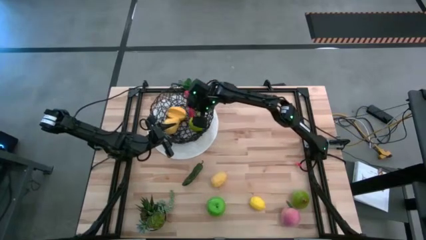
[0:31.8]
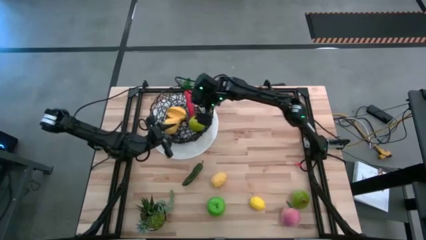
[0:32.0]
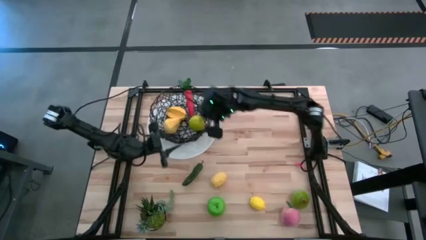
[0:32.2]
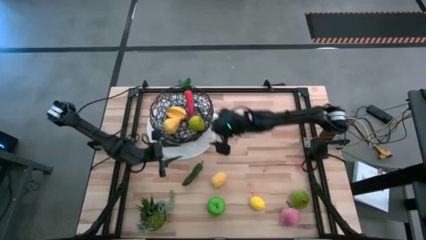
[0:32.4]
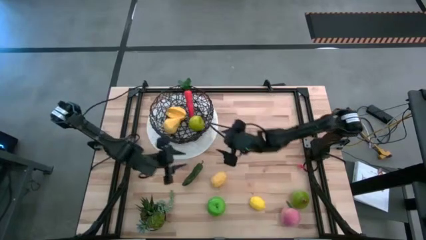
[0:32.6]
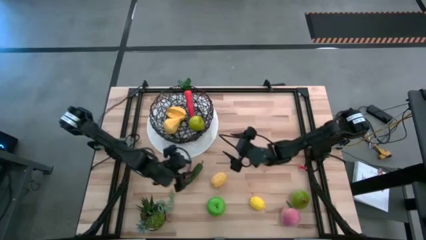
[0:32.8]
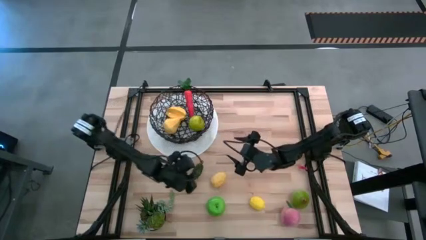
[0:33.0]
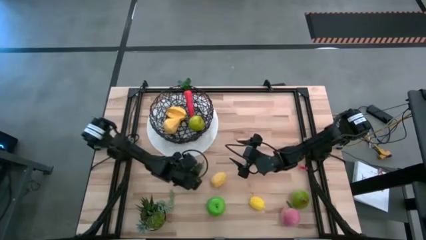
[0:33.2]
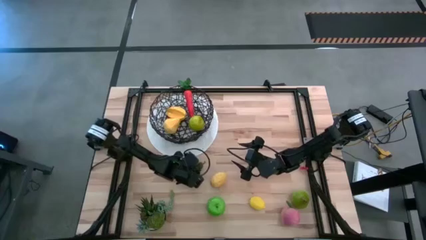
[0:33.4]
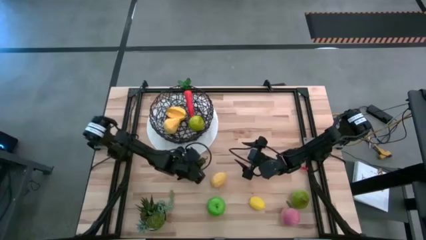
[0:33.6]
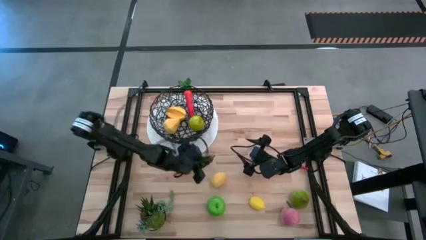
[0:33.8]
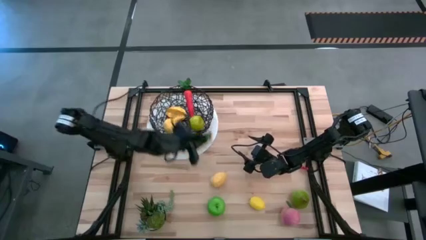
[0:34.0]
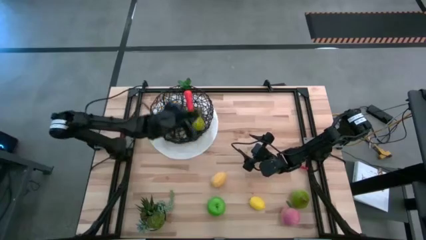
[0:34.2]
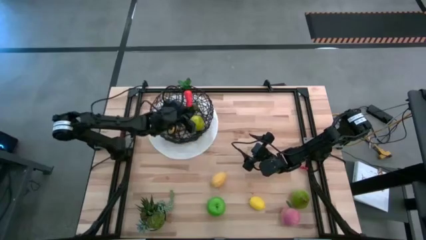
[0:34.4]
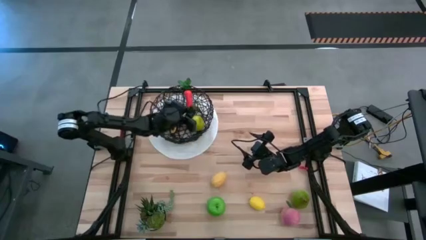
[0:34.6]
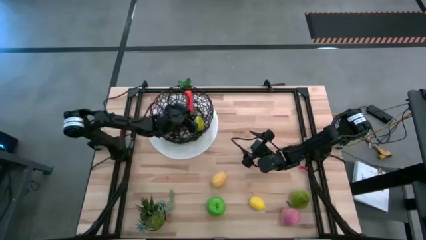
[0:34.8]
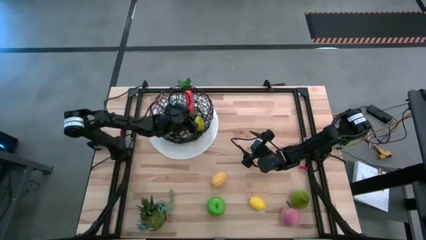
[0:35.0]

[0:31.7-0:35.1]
Task: Build produce basket
Put the green chili pepper into the wire basket

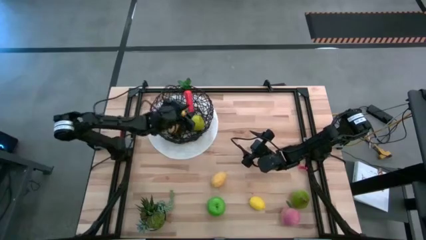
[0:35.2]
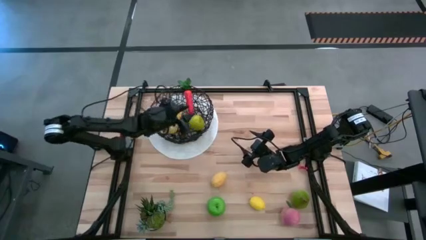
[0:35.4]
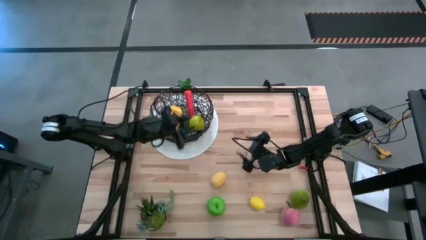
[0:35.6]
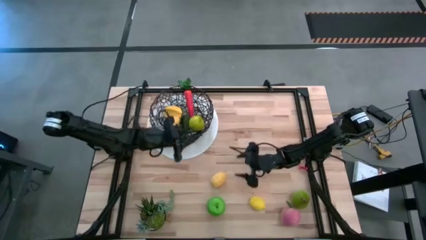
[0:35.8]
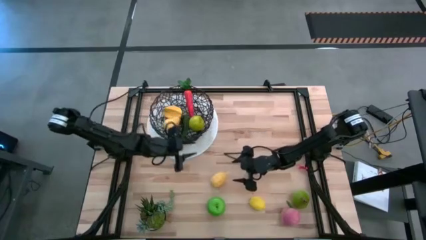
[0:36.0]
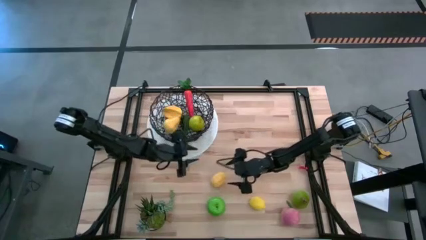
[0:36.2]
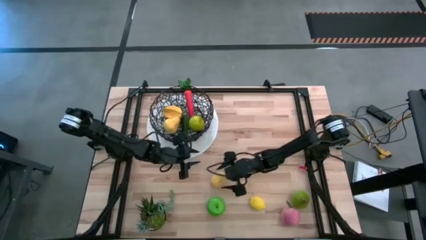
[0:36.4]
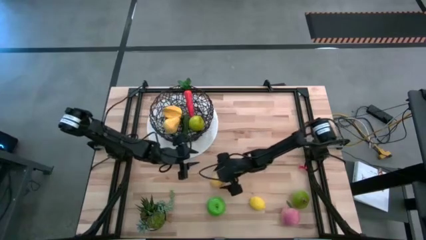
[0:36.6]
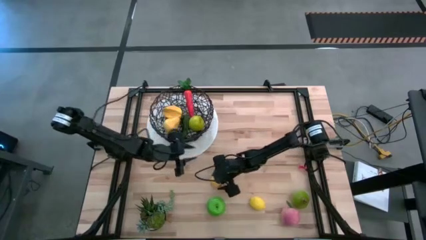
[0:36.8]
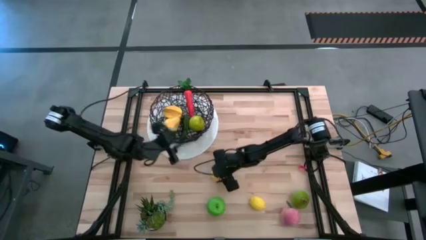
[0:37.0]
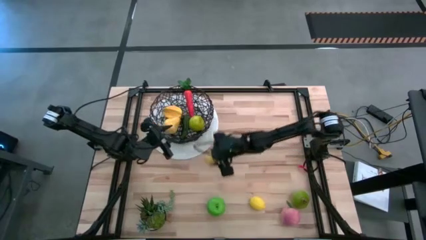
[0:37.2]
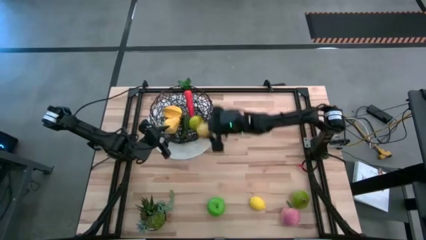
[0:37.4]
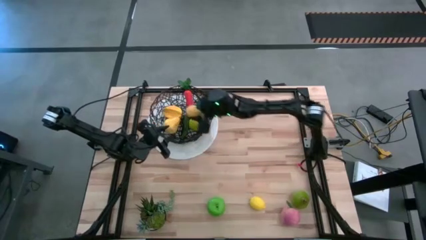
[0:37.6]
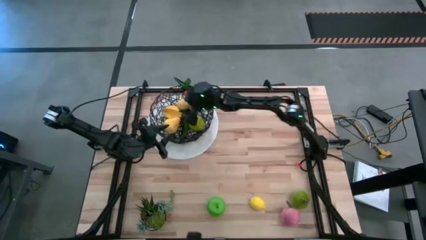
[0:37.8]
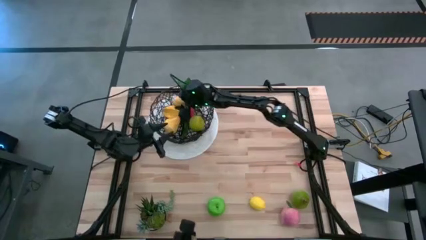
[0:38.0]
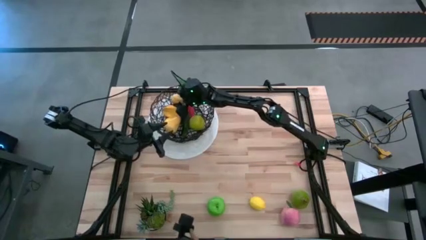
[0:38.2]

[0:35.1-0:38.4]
Put the potato into the wire basket

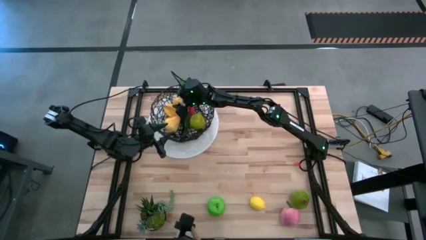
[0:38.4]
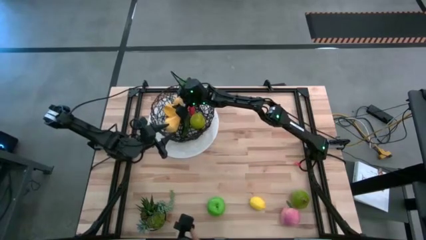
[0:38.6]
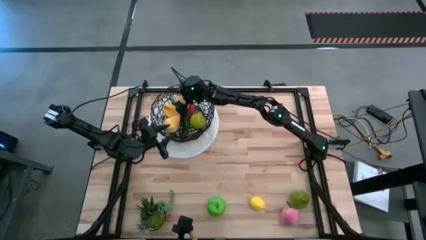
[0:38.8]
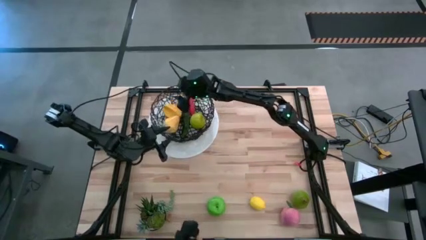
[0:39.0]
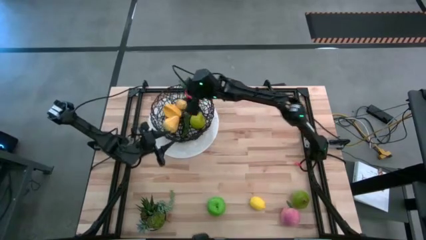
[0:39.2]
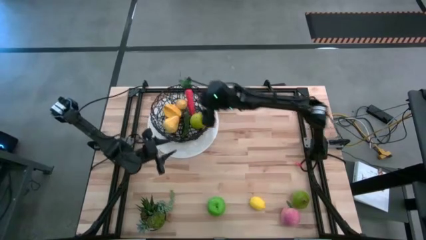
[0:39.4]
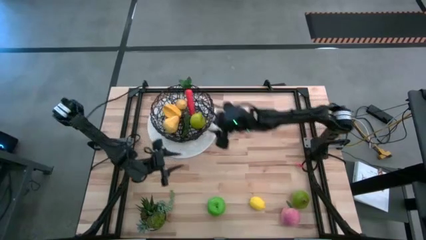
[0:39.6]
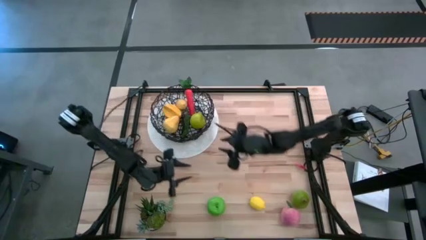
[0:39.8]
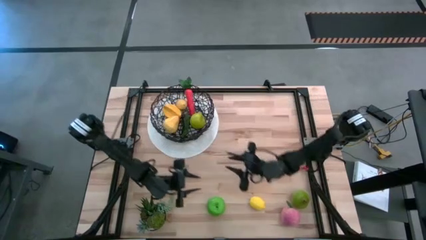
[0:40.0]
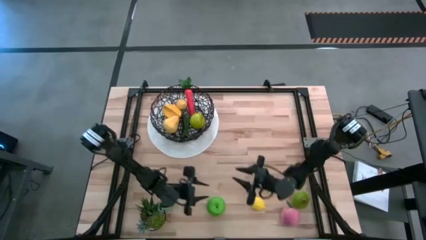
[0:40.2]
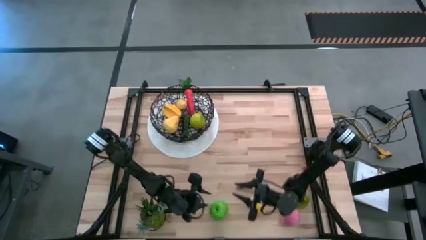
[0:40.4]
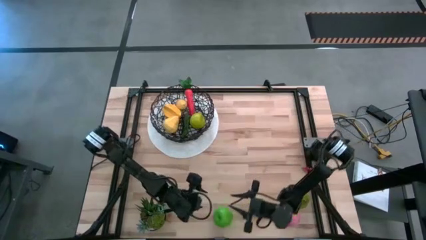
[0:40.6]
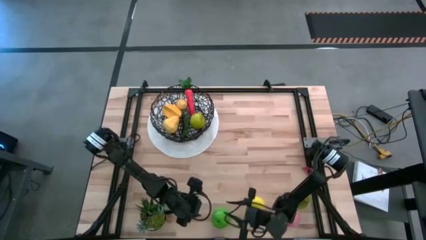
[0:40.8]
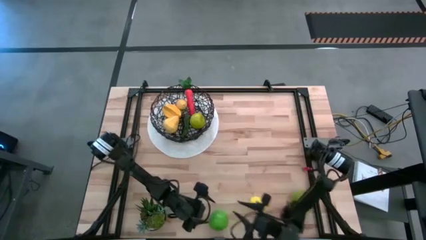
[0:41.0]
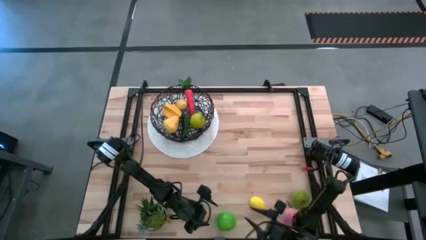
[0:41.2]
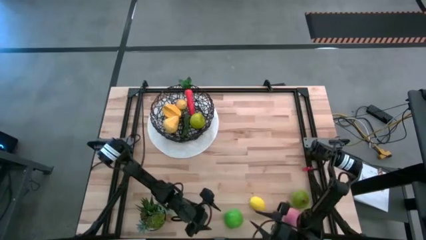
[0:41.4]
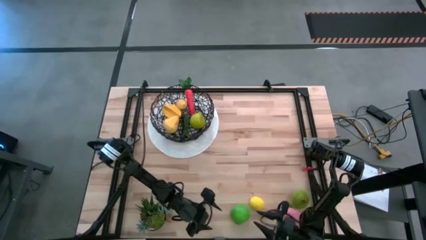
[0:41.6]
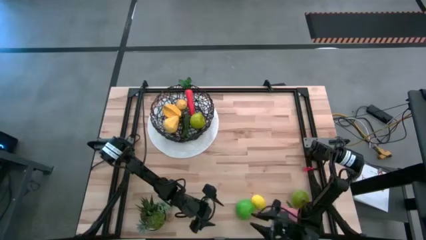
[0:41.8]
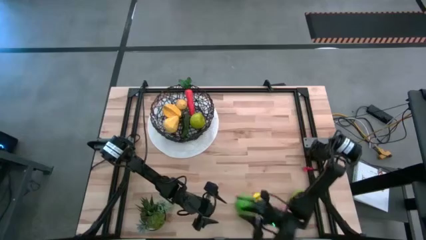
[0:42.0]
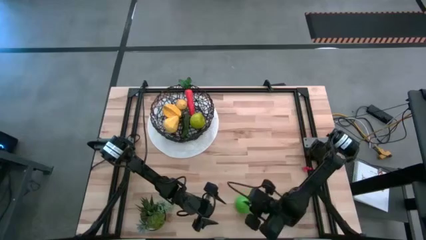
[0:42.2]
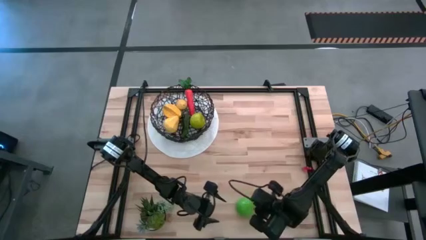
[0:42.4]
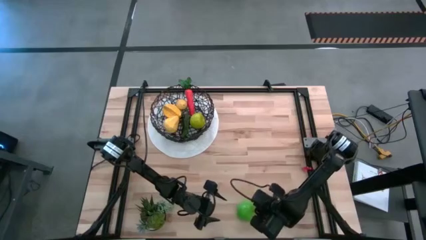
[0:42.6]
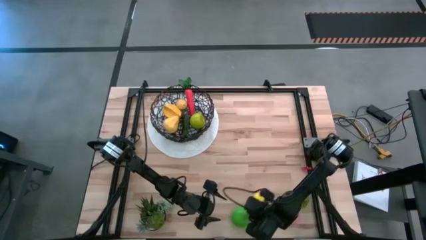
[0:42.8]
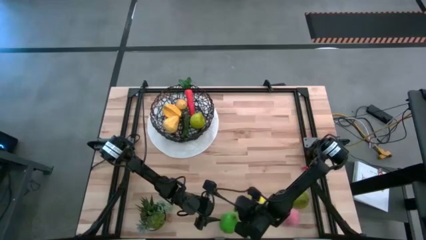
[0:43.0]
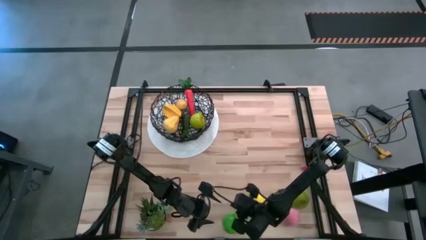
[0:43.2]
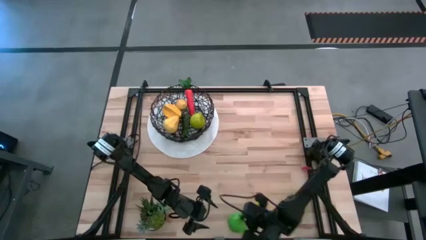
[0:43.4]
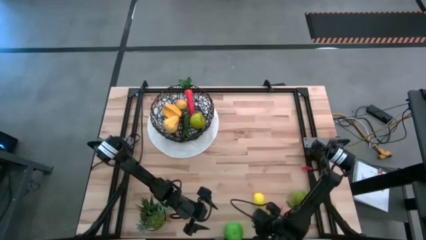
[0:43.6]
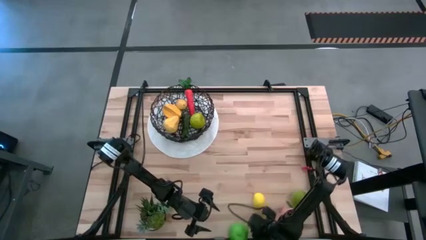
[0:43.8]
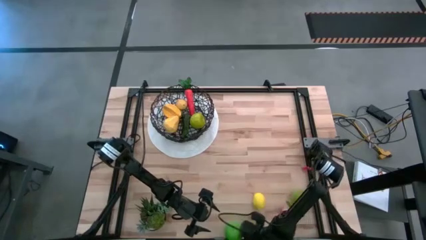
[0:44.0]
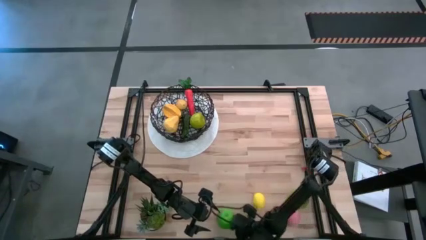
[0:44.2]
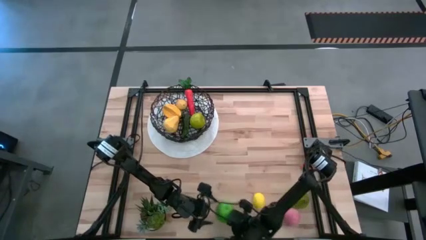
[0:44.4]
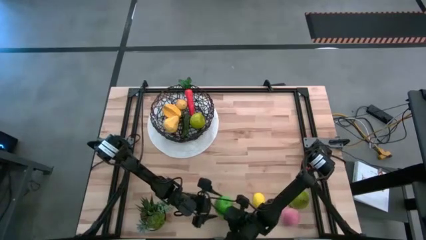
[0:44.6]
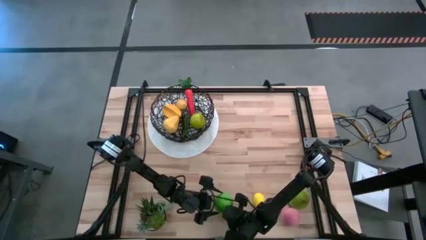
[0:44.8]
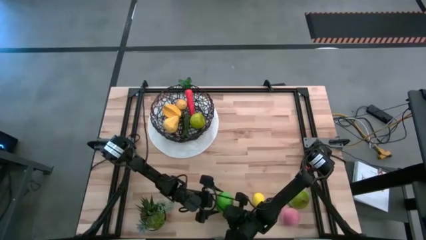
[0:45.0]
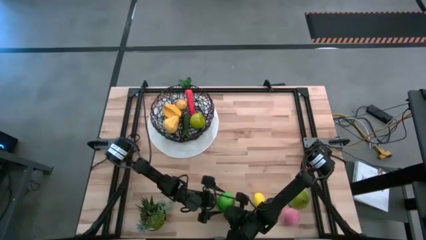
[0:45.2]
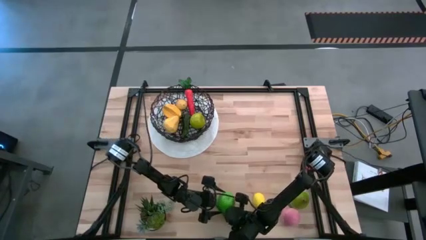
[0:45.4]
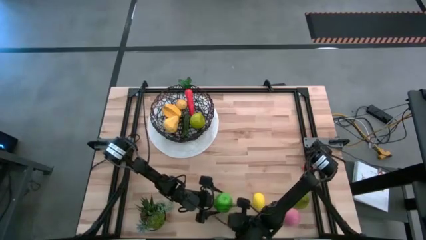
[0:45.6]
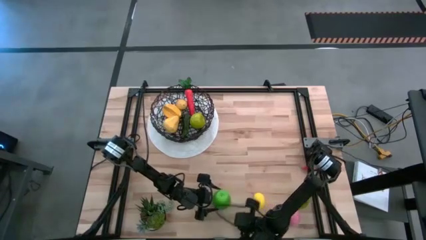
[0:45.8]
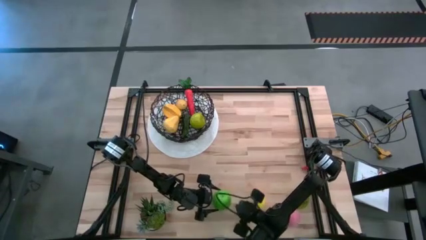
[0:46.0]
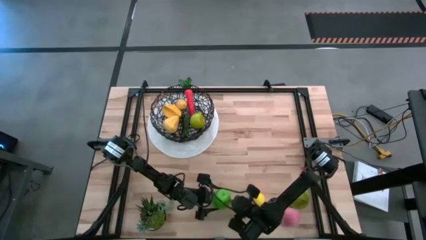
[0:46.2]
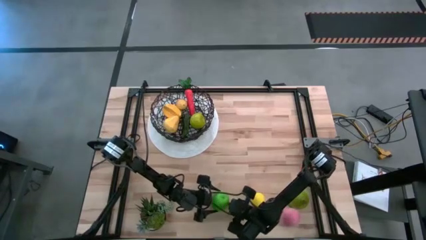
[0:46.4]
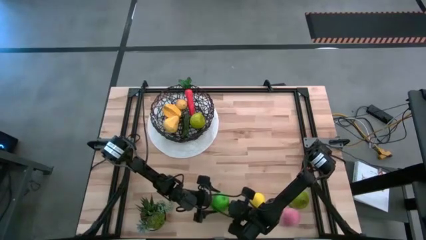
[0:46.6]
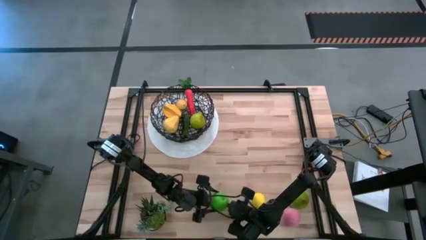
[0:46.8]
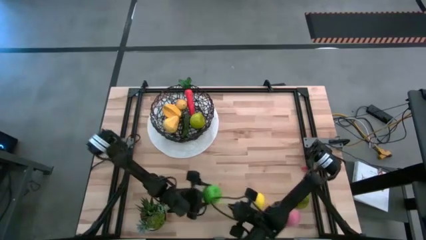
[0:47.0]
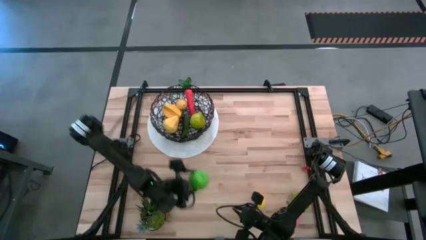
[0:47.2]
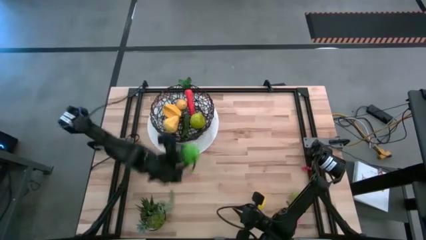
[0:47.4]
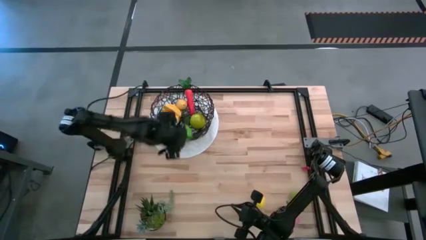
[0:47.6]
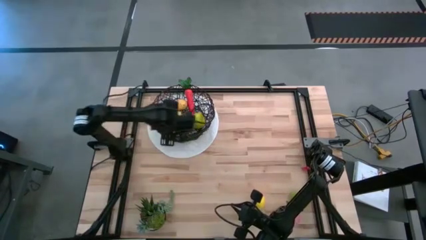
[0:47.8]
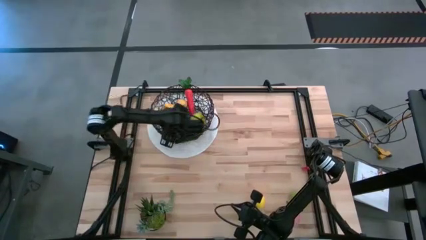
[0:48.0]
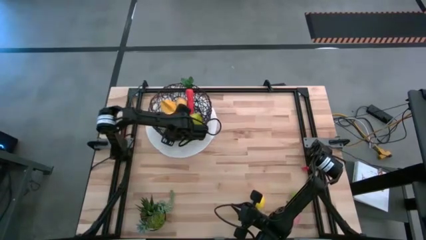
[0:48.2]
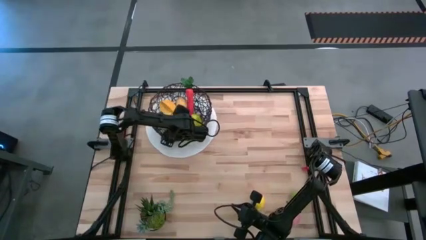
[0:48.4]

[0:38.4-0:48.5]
Put the green apple into the wire basket

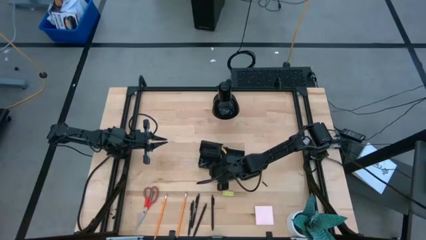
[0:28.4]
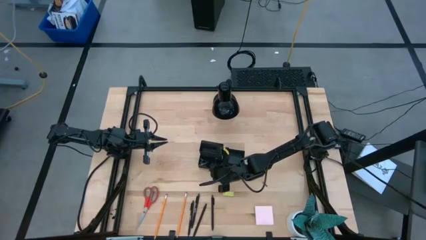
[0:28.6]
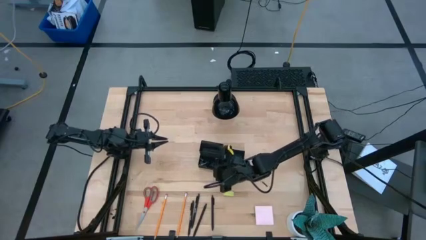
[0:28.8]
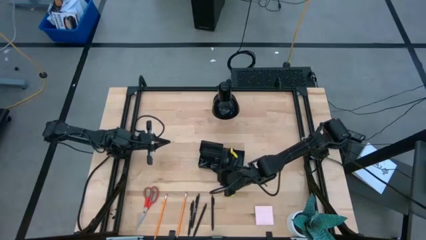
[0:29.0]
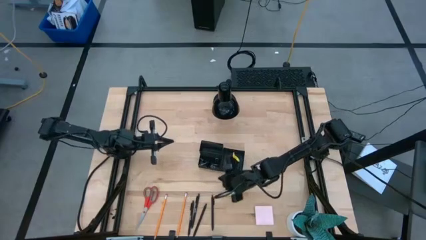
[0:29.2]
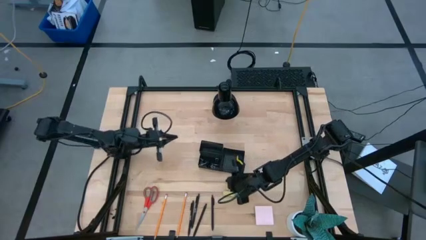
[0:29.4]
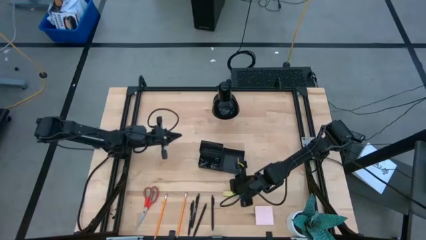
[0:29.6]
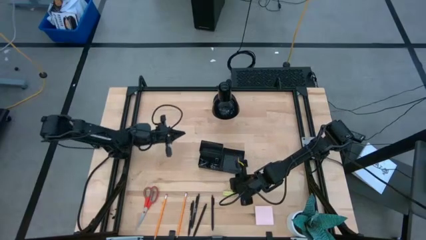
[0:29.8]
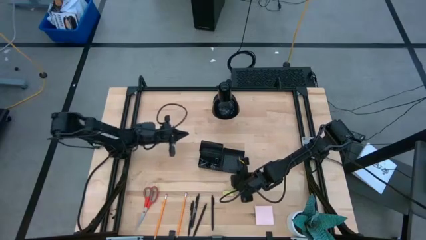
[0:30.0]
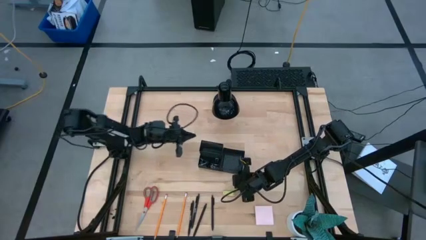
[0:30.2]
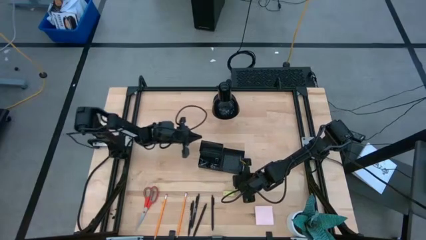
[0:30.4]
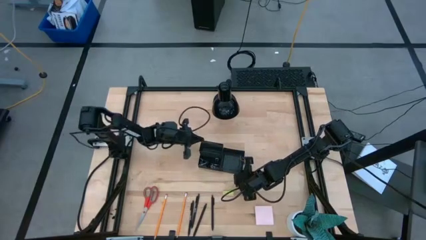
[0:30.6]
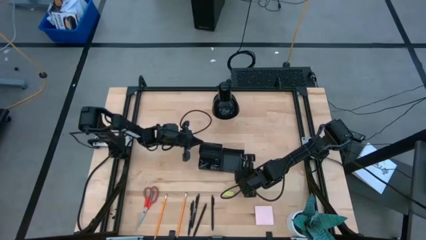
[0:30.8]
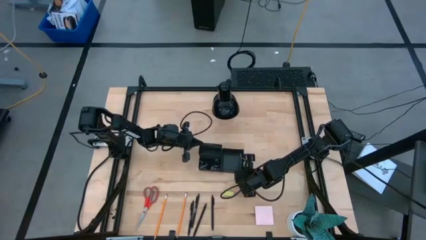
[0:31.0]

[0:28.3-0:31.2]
Task: Pick and place office supplies into organizer
Adjust the desk organizer
